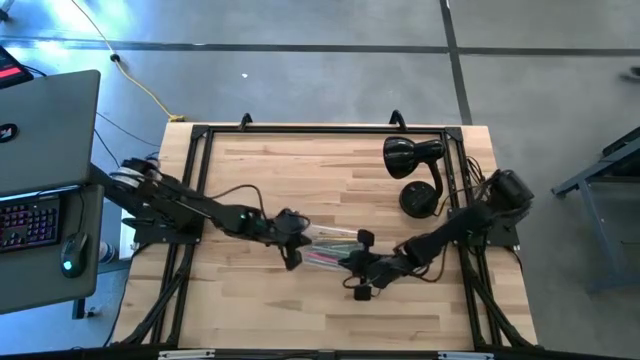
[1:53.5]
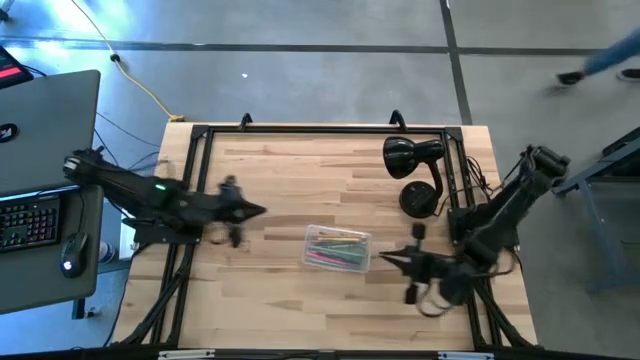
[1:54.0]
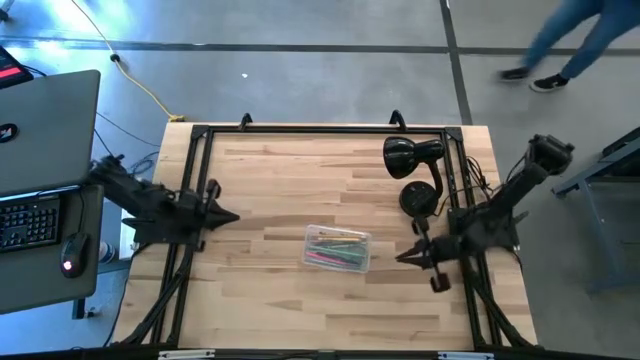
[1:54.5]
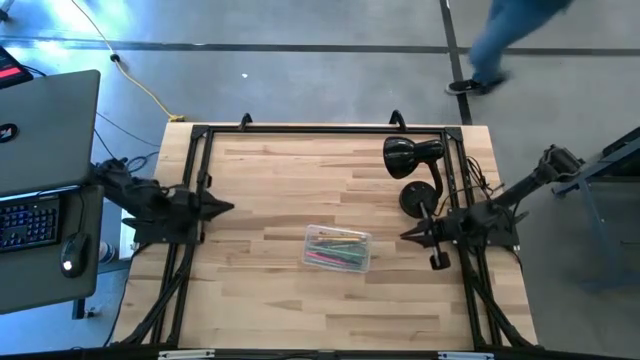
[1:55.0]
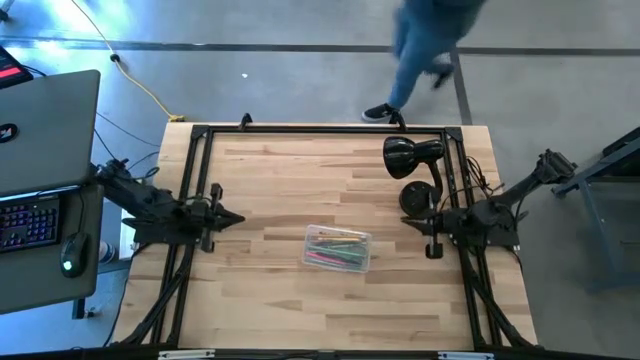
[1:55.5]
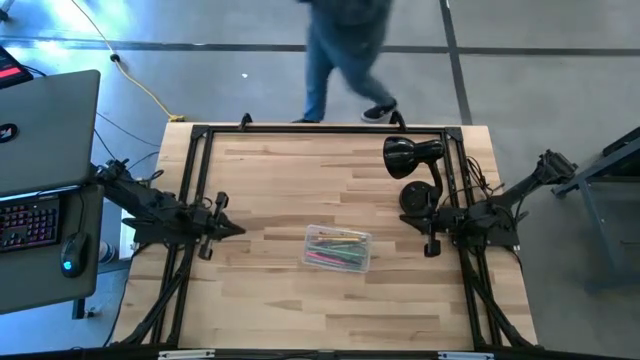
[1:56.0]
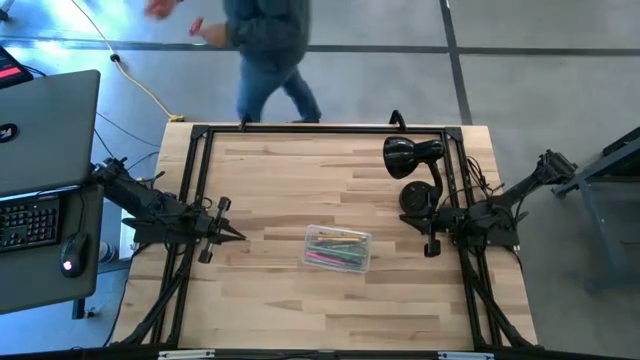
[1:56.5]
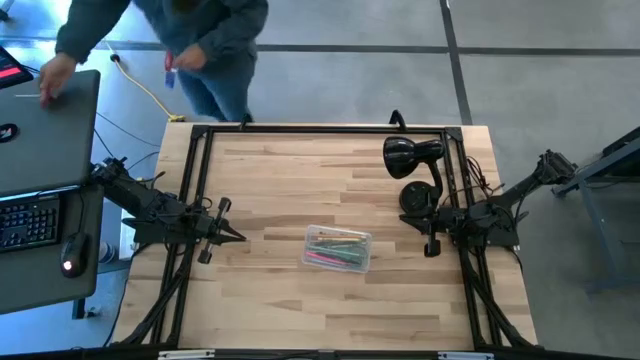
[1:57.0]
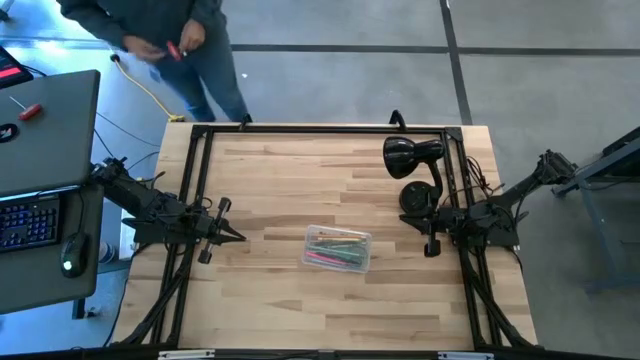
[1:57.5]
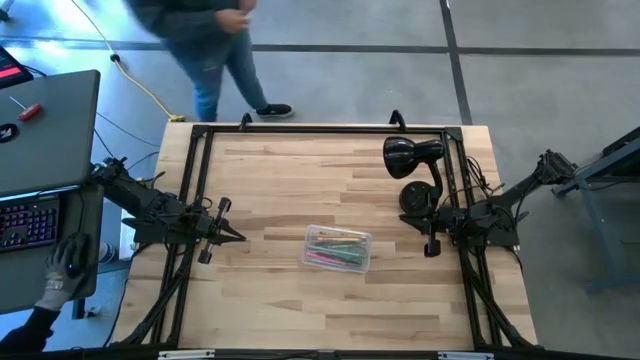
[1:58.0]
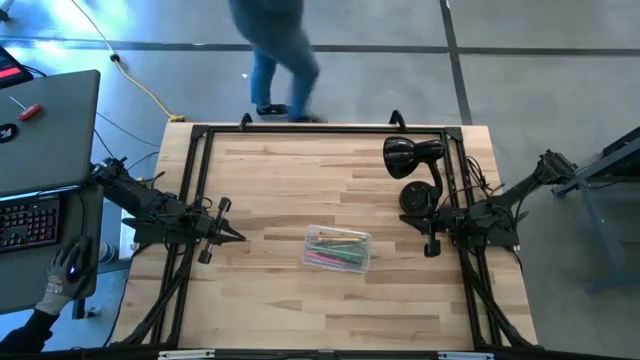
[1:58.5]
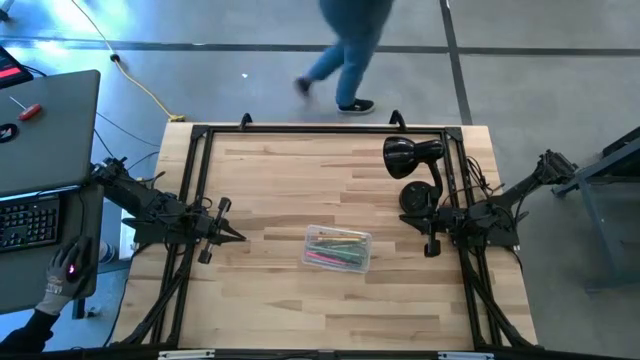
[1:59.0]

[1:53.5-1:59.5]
Task: Pick & place school supplies into a supply box
Return to Home Position

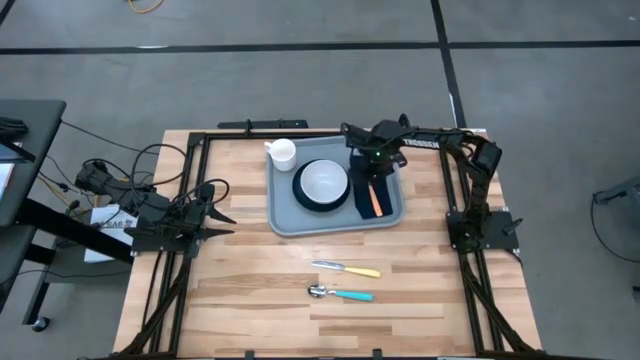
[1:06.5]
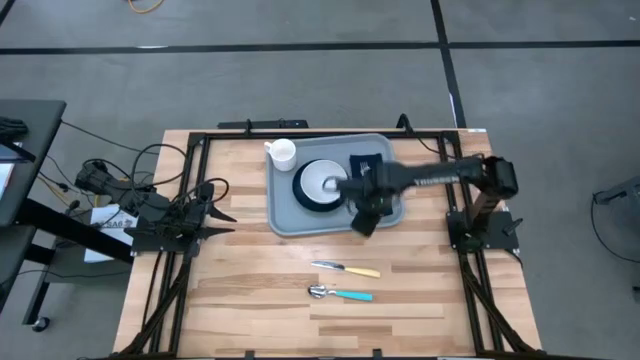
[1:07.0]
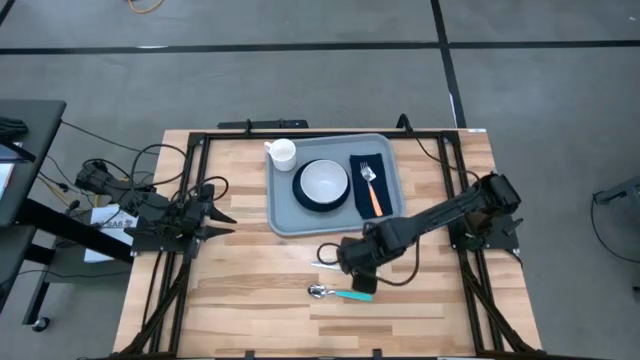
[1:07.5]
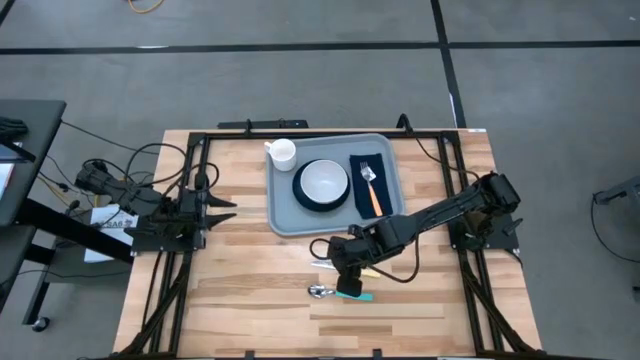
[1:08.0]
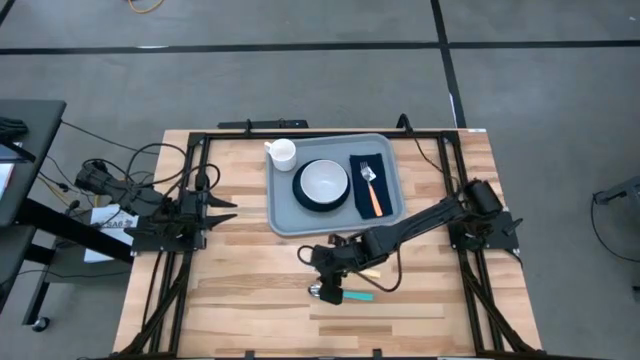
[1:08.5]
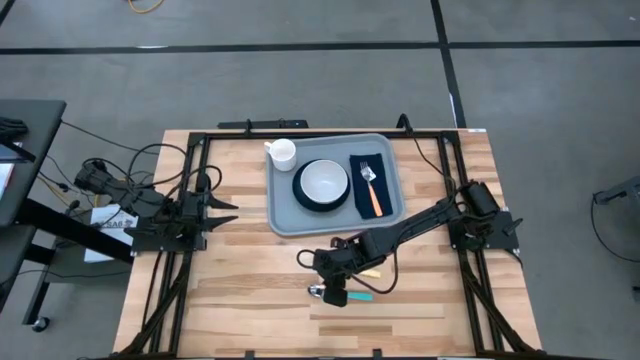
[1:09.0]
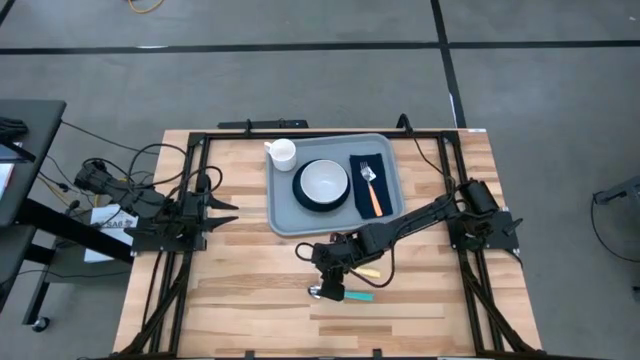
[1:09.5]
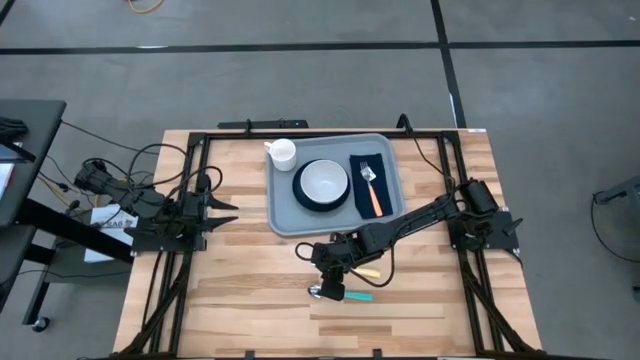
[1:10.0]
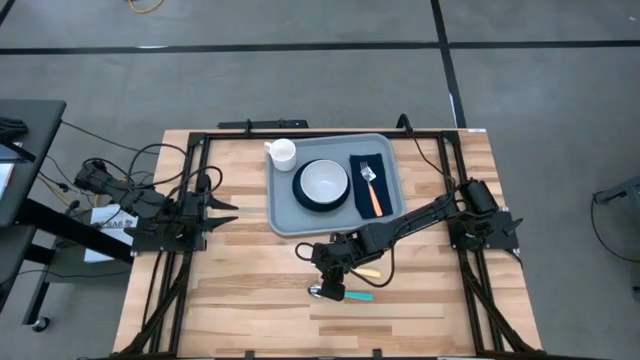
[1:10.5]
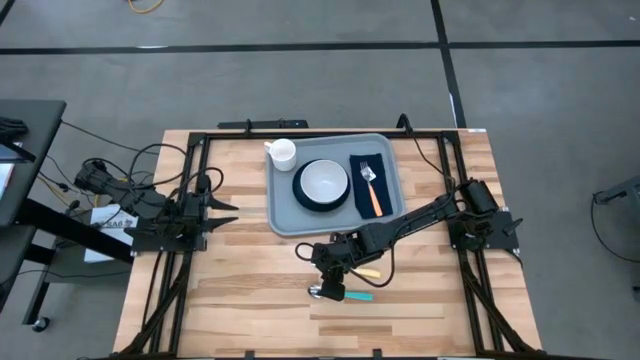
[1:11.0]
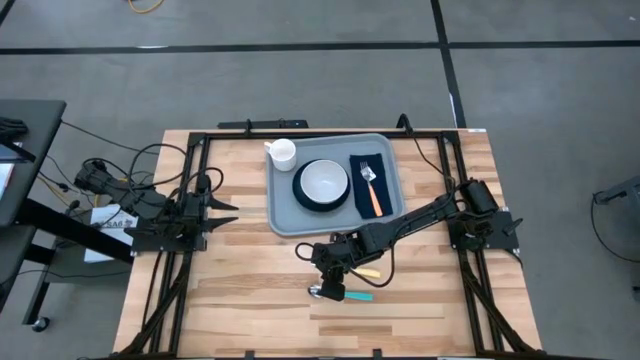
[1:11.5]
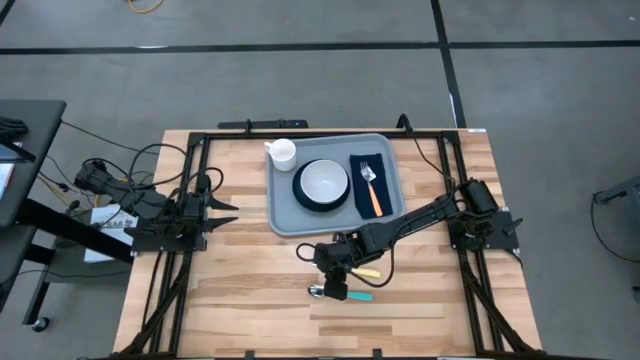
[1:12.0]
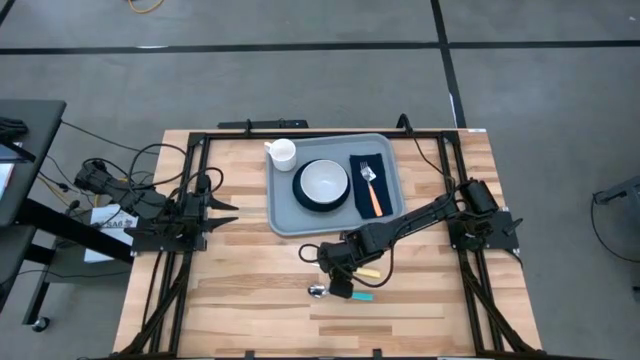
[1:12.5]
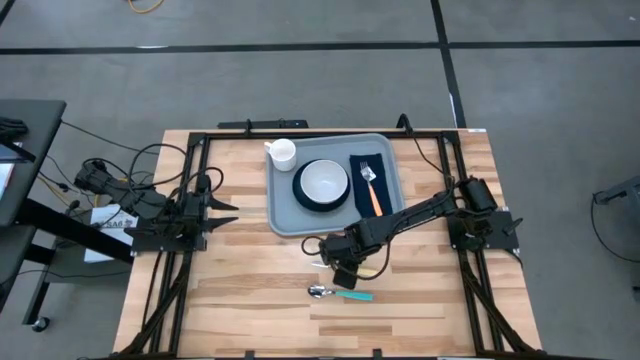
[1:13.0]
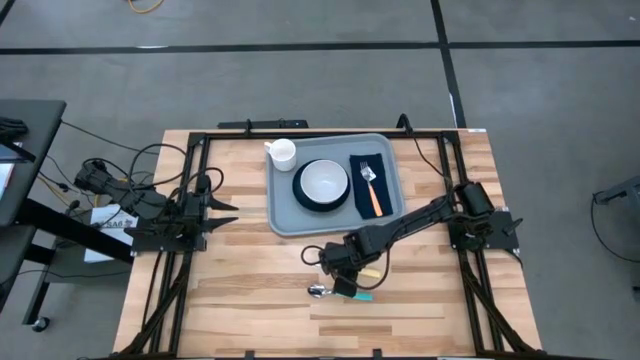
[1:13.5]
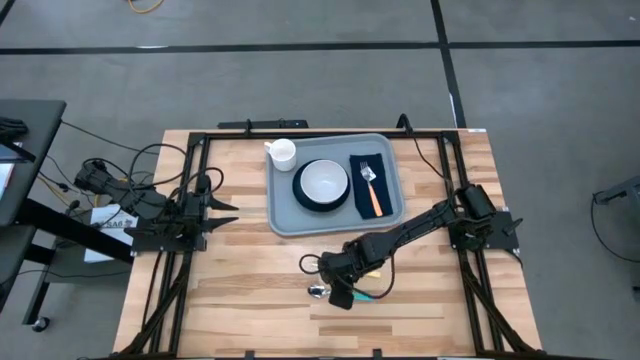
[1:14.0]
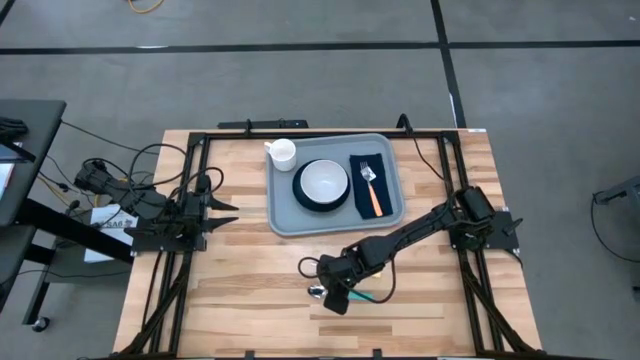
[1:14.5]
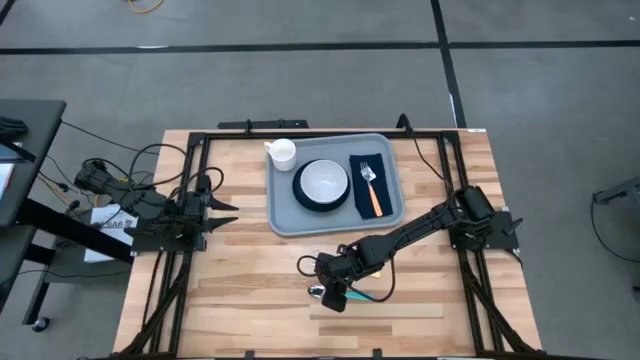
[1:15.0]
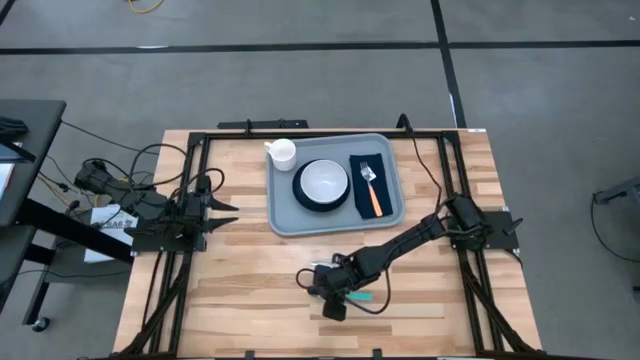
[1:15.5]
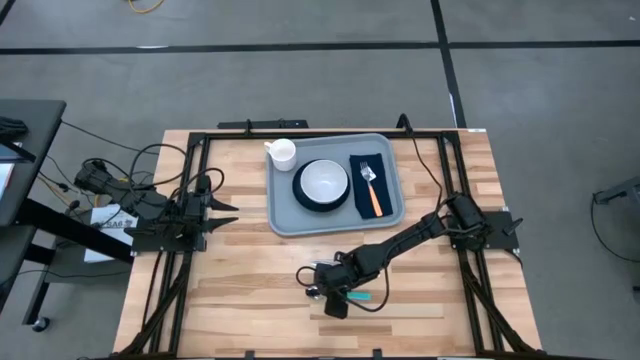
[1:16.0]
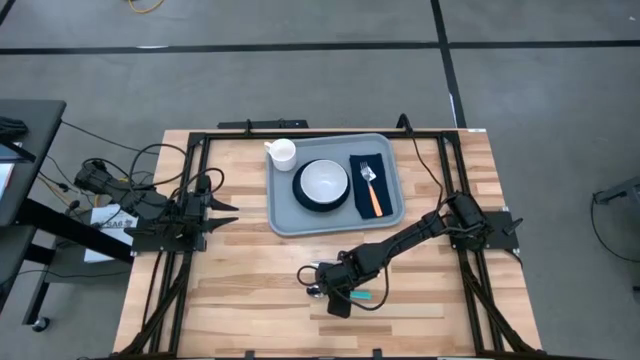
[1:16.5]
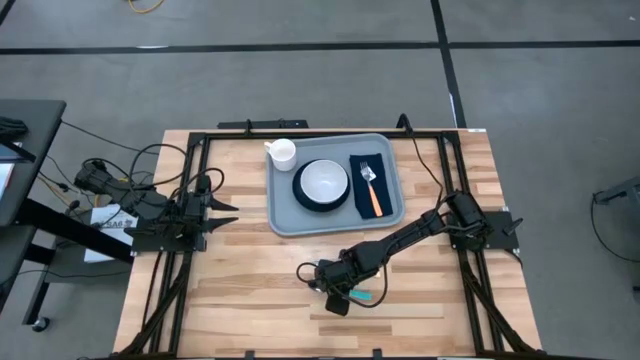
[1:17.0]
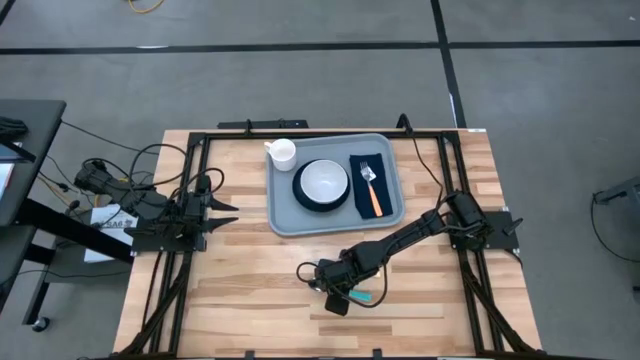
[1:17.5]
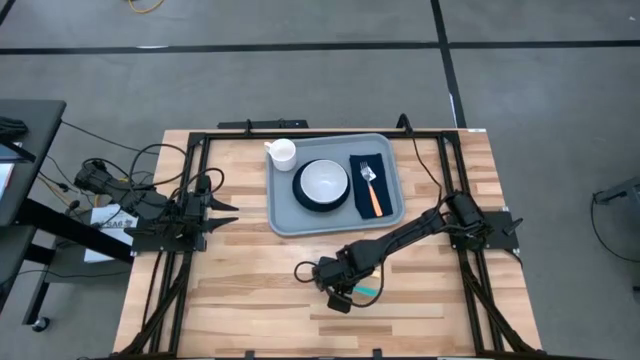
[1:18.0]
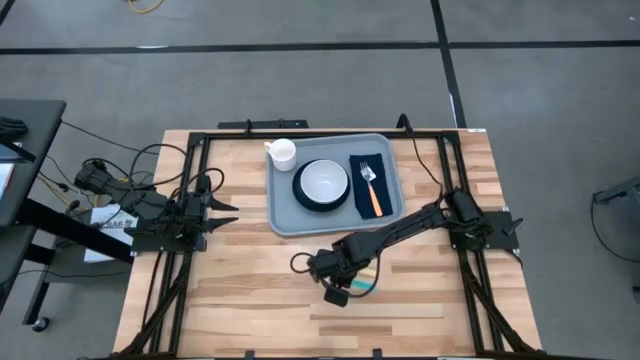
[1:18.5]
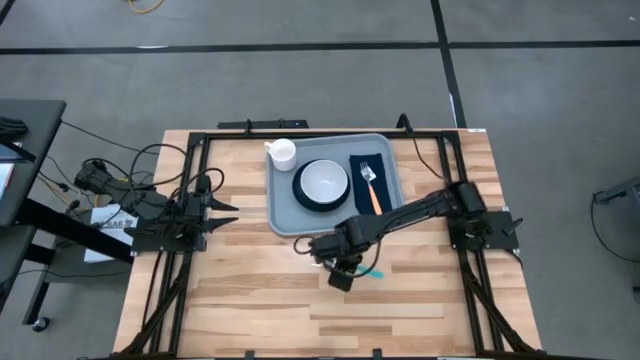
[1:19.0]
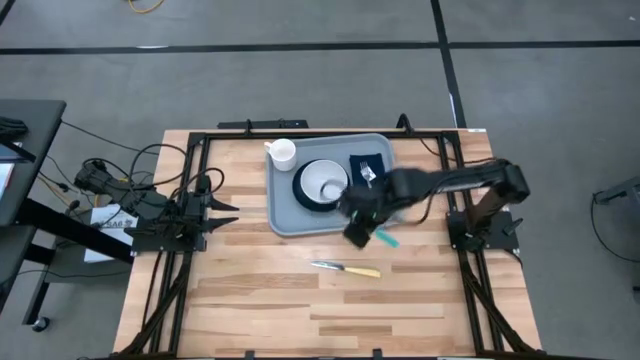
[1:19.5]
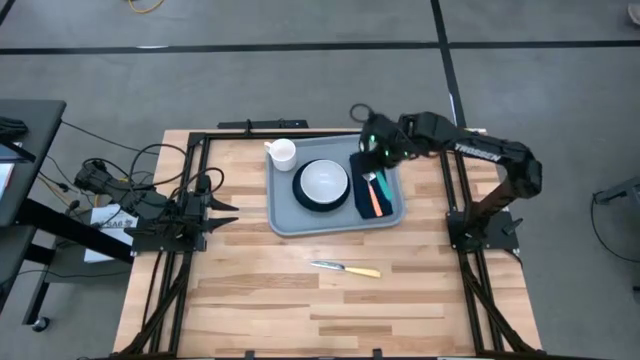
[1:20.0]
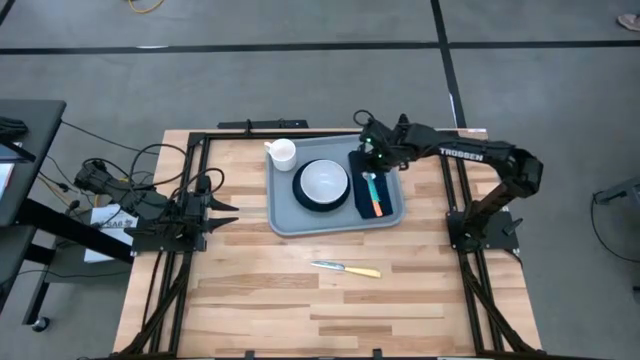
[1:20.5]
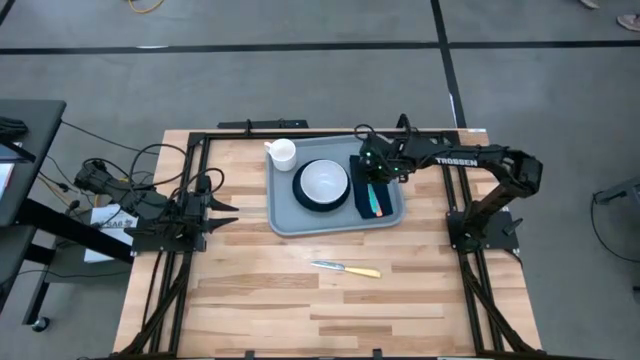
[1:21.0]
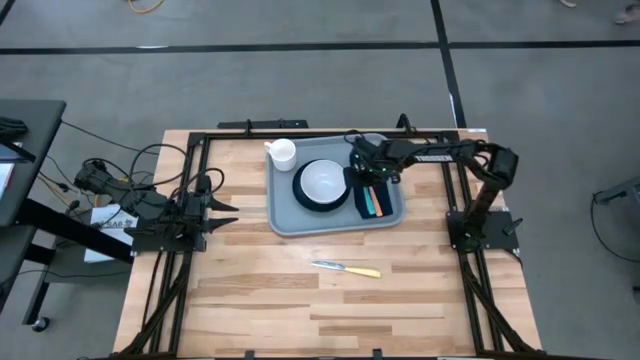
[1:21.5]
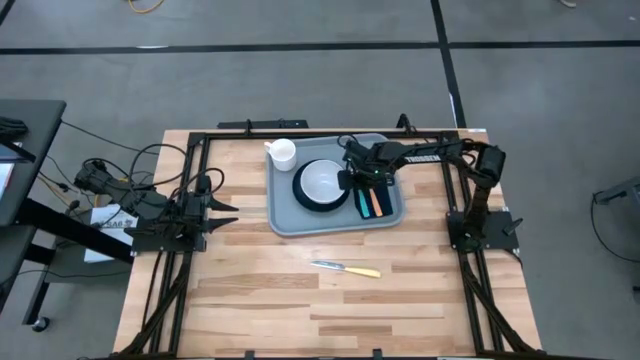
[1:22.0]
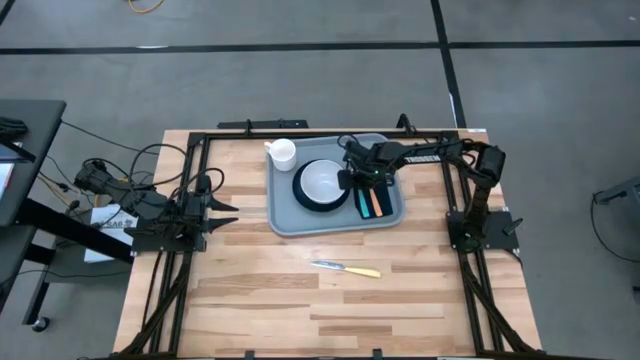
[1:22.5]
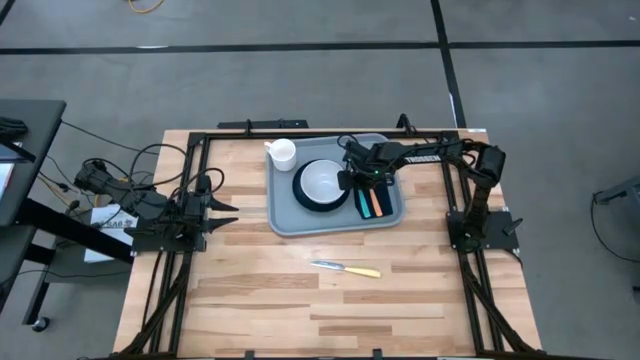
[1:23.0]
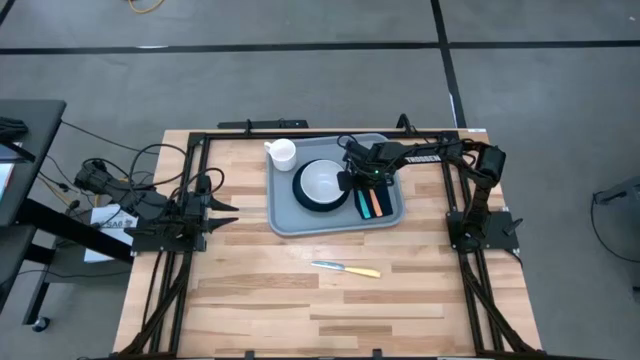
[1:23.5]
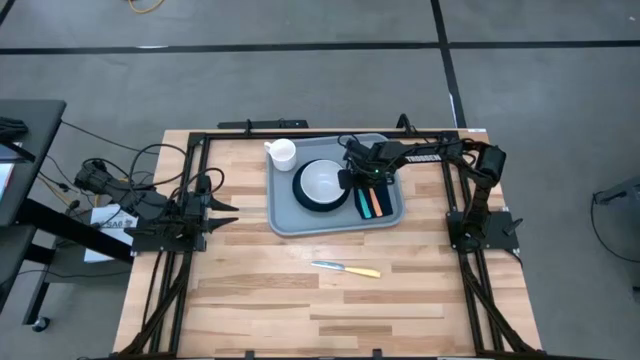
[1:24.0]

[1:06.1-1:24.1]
Task: Set up tray
Put the blue spoon on the dark blue napkin to the left of the orange fork
